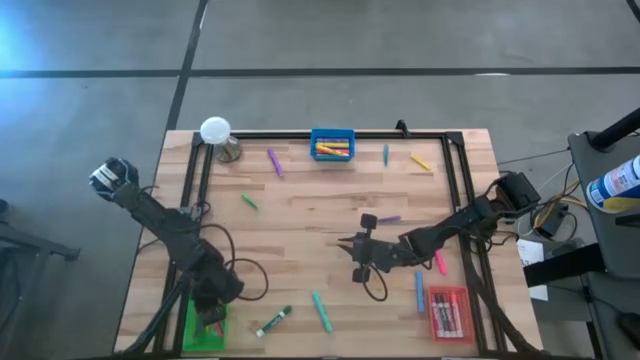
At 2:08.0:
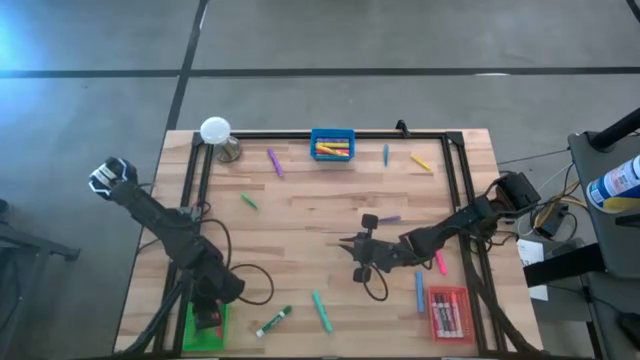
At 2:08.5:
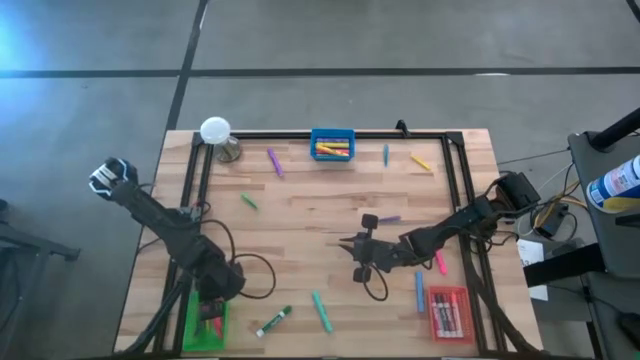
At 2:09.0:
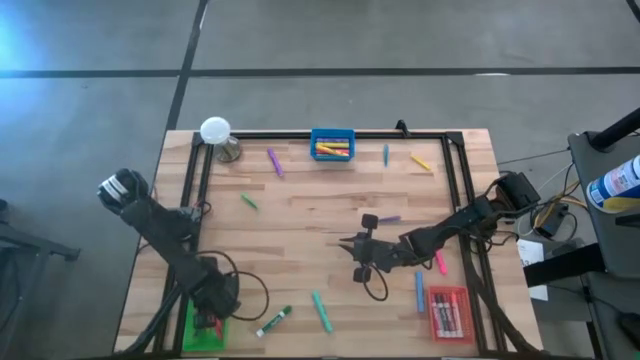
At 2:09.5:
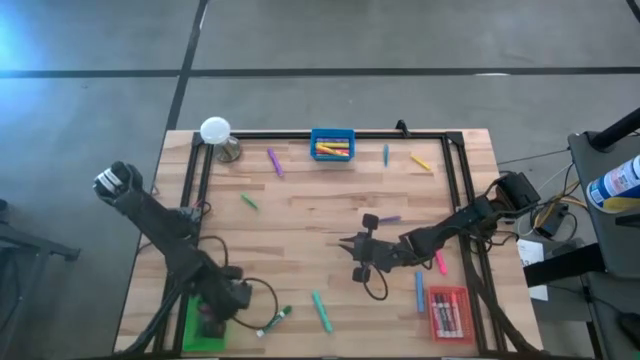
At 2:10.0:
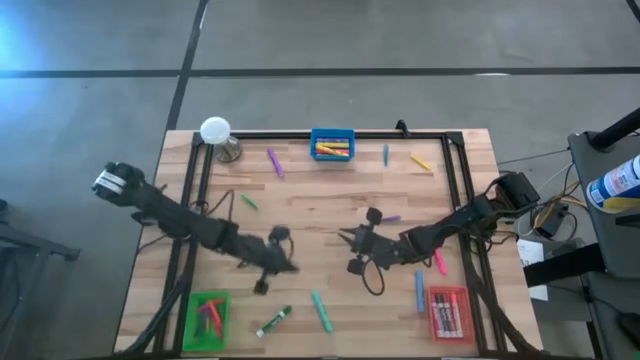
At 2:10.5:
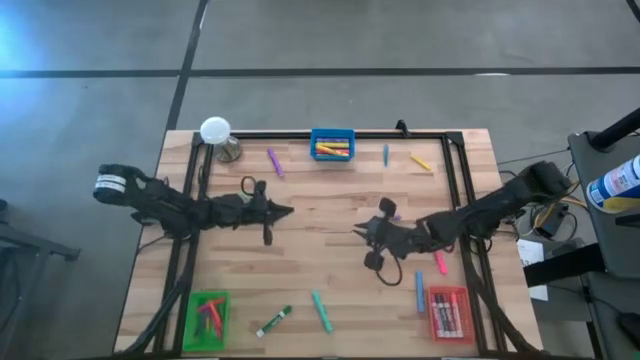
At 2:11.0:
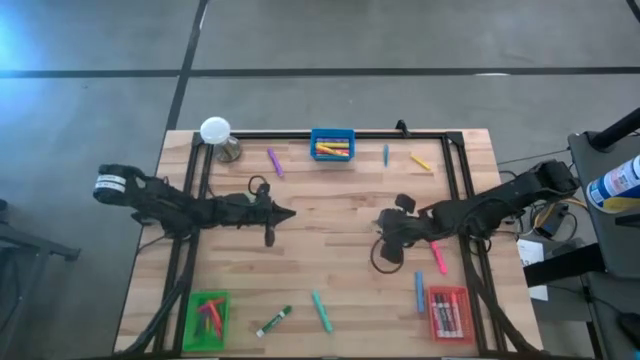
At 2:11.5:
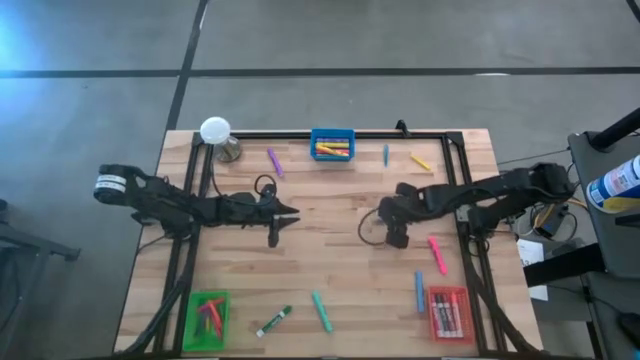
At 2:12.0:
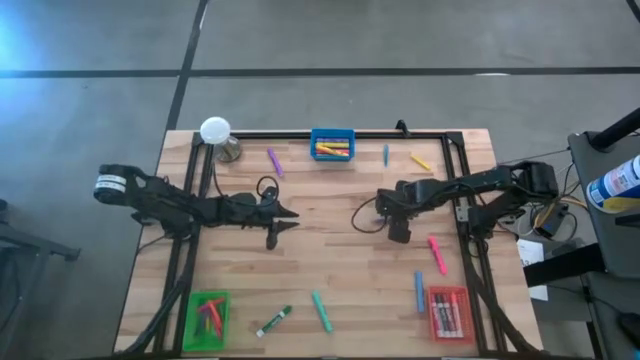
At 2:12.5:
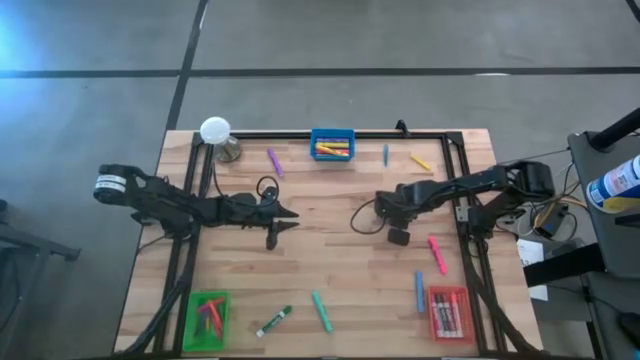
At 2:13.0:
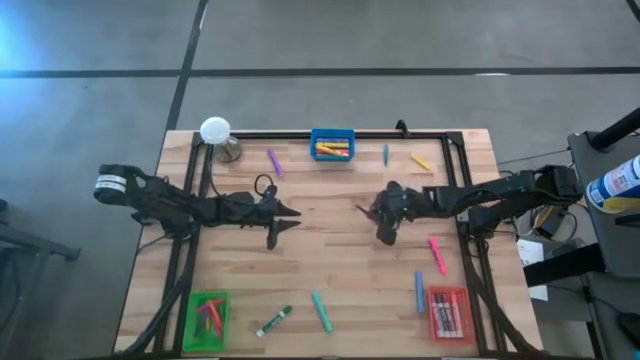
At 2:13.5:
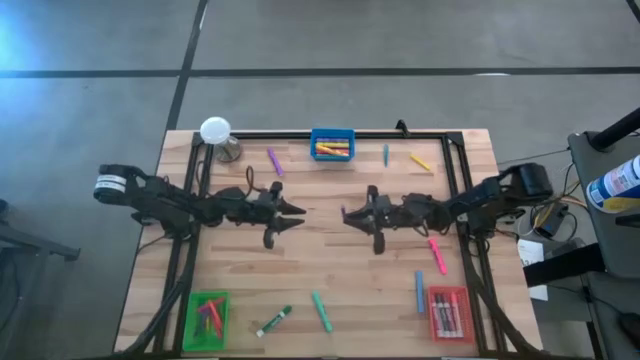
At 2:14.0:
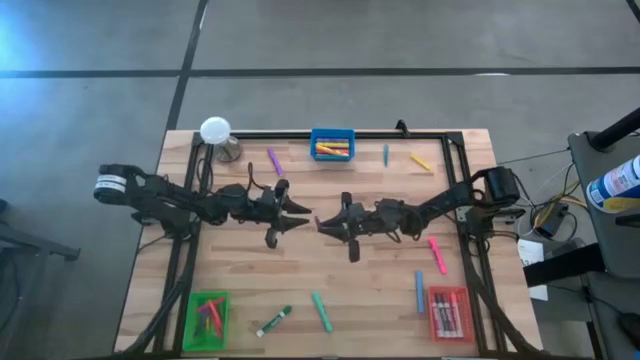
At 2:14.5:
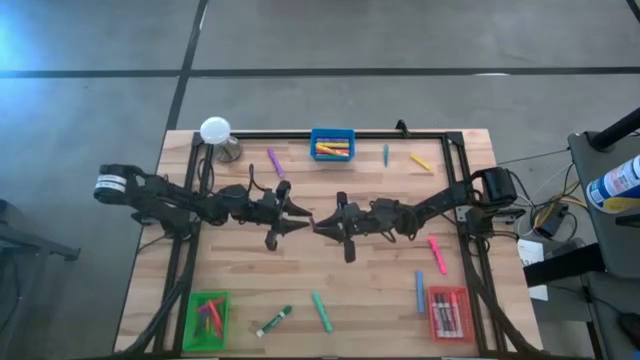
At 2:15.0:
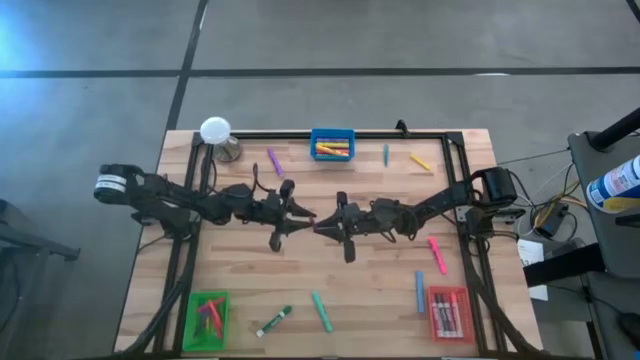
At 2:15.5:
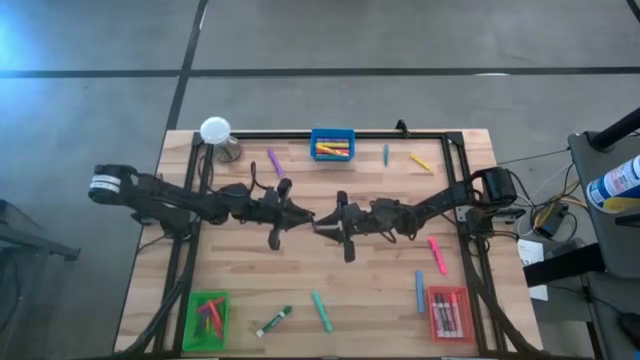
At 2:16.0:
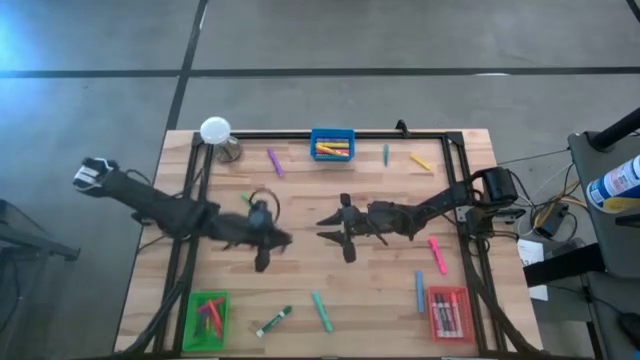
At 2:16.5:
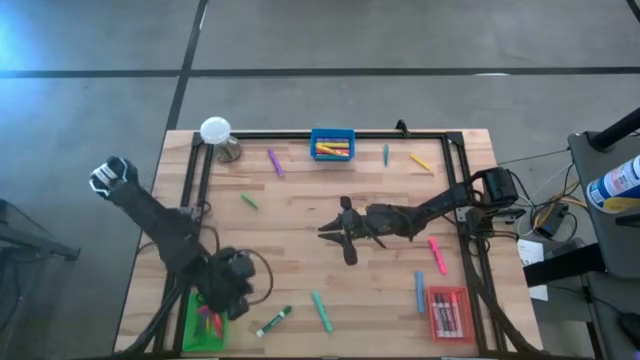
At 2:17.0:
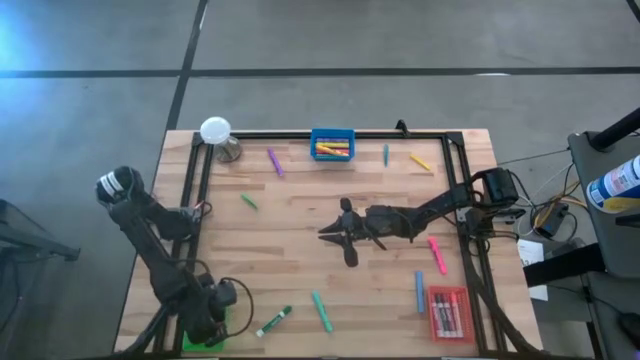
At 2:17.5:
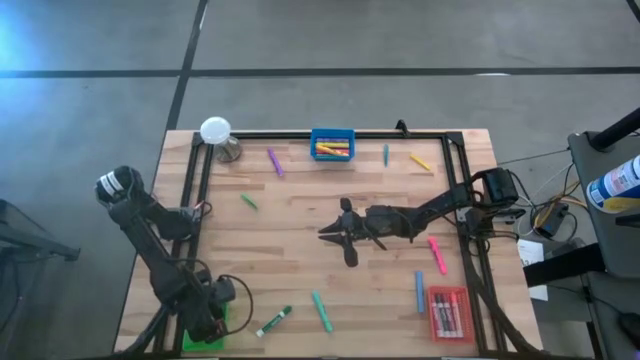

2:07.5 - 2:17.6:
Task: Pick & Place Markers
Put the violet pen into the green bin

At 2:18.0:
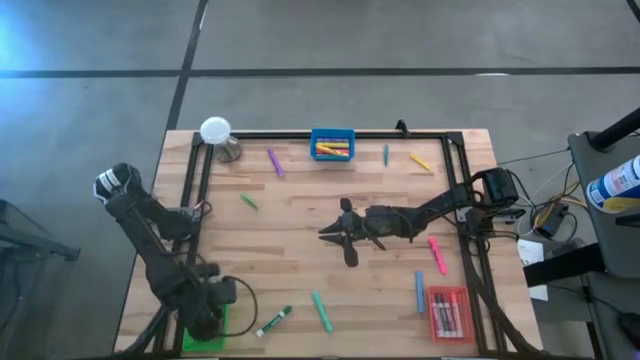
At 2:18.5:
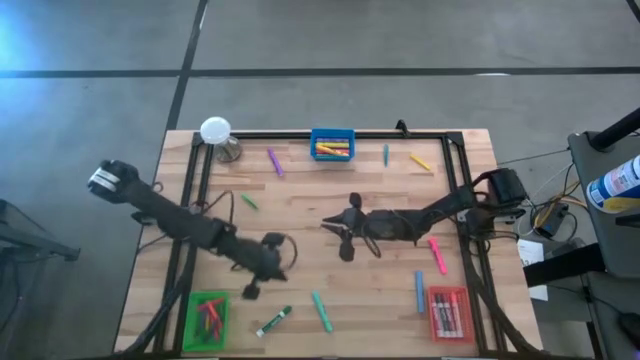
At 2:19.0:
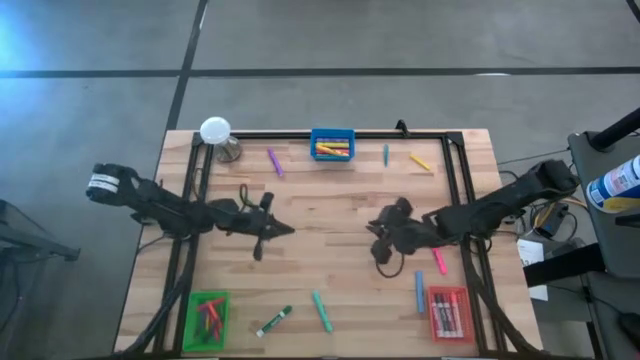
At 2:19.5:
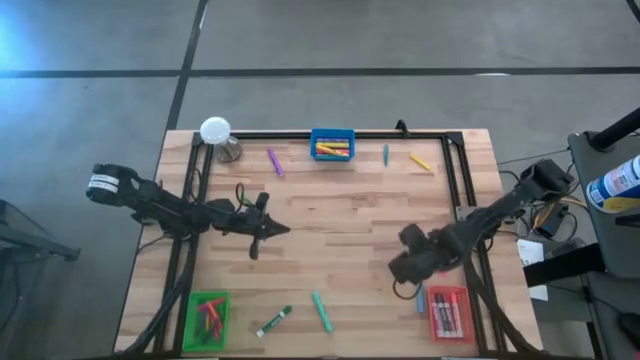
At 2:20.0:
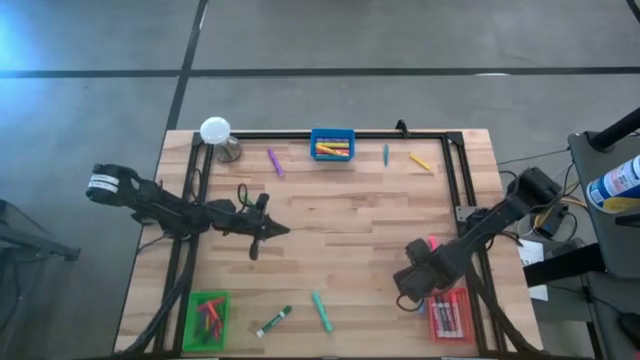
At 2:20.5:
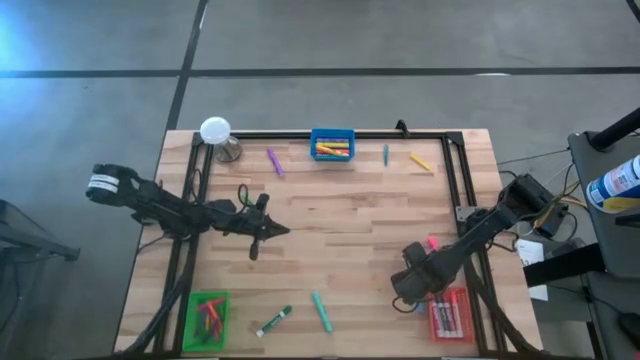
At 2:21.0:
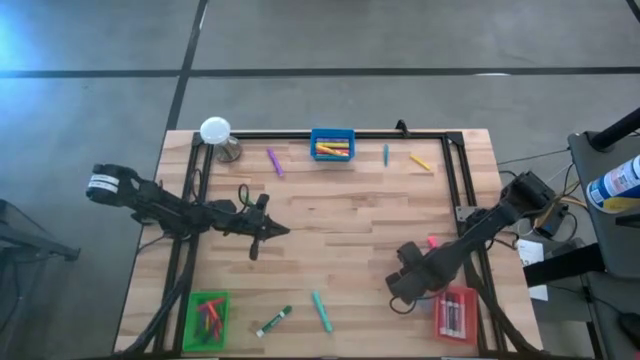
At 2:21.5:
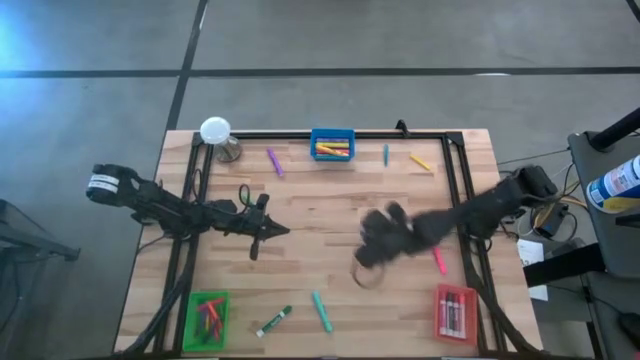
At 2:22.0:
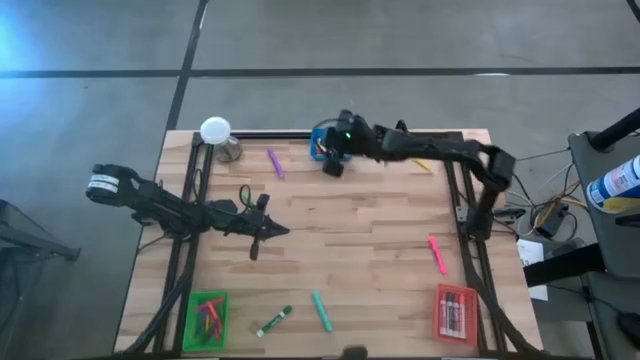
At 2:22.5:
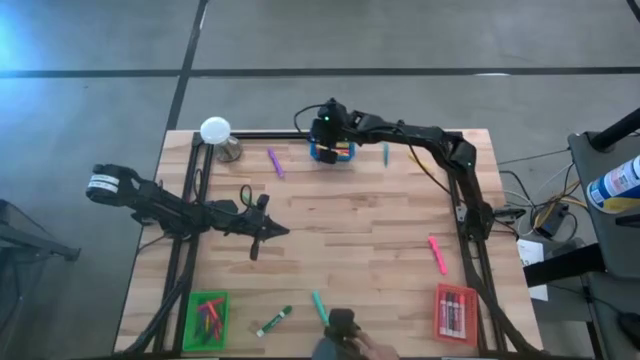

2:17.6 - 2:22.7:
Put the blue highlighter into the blue bin

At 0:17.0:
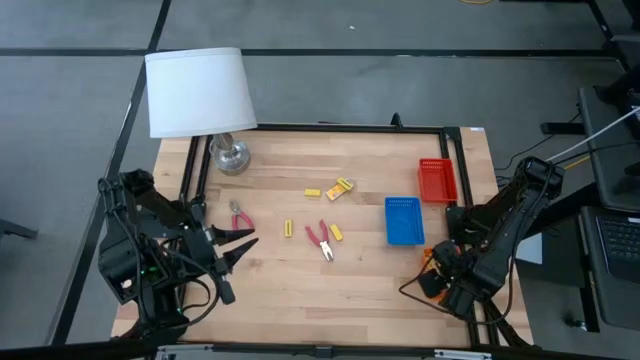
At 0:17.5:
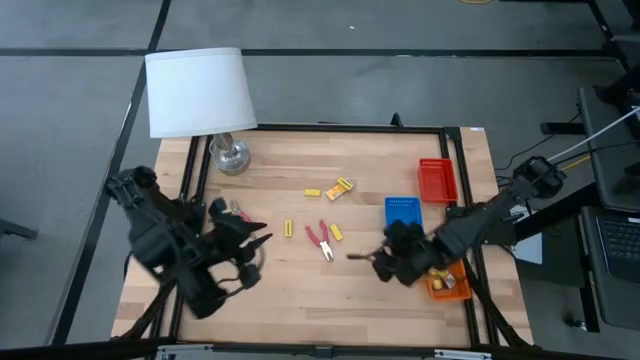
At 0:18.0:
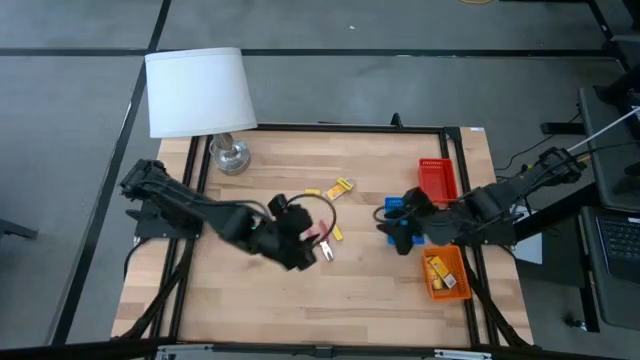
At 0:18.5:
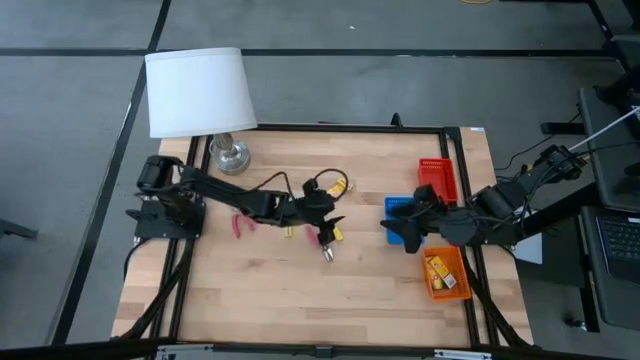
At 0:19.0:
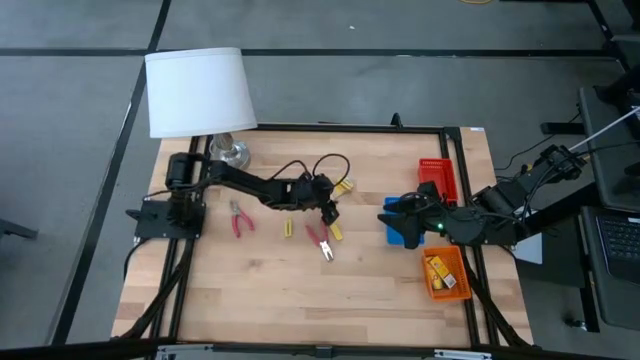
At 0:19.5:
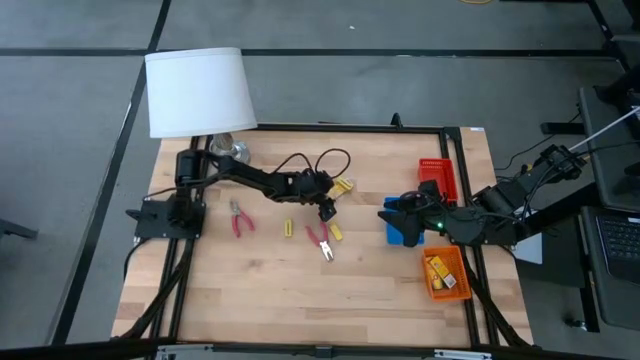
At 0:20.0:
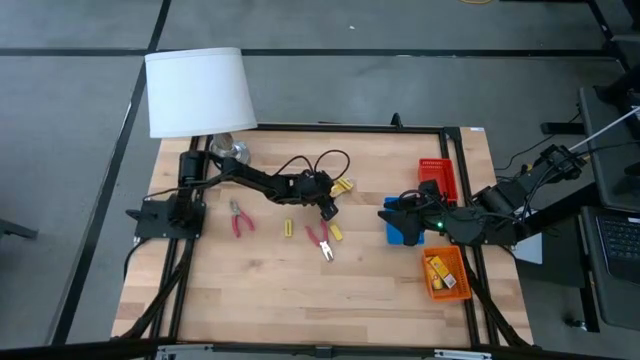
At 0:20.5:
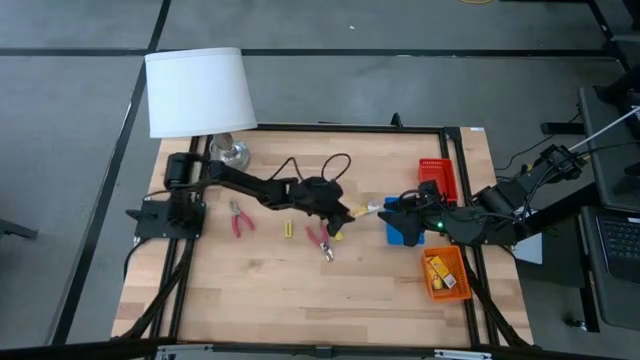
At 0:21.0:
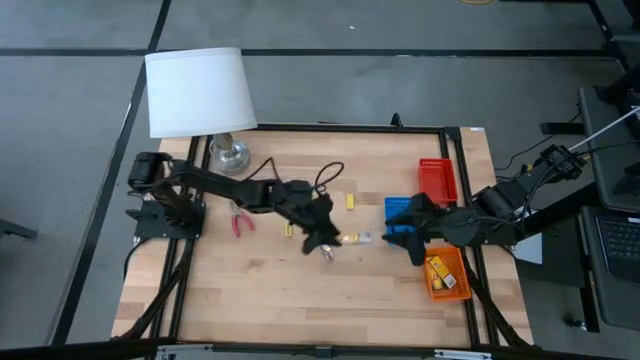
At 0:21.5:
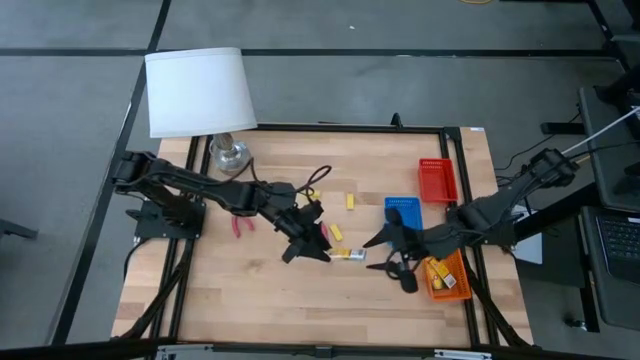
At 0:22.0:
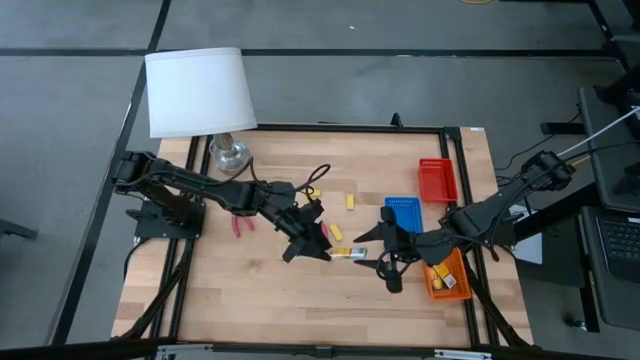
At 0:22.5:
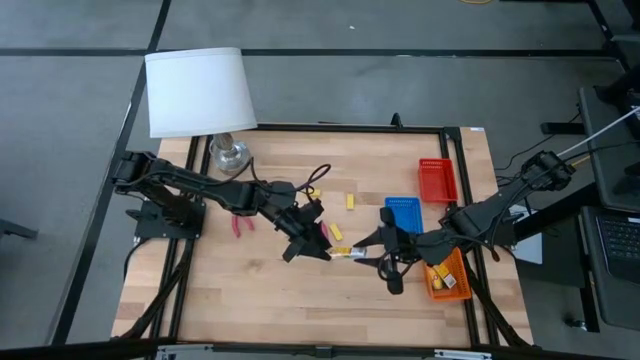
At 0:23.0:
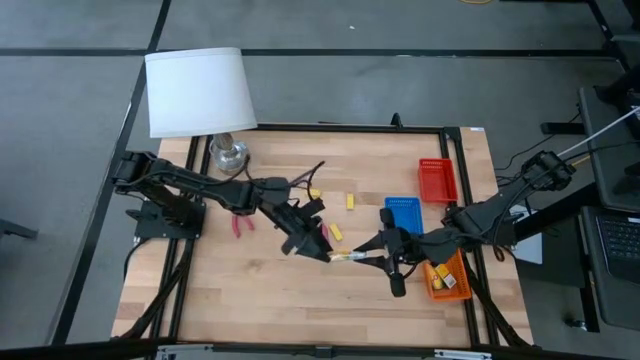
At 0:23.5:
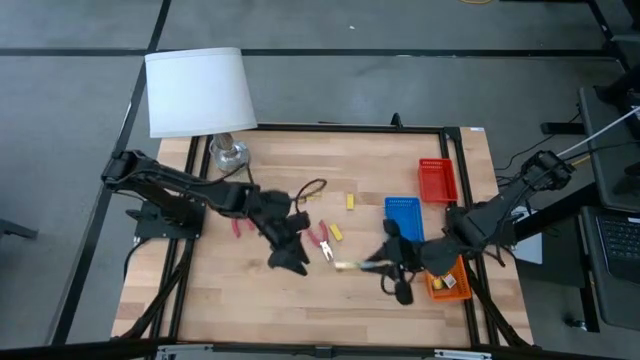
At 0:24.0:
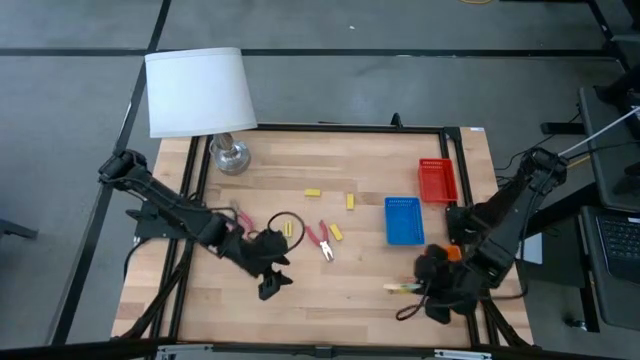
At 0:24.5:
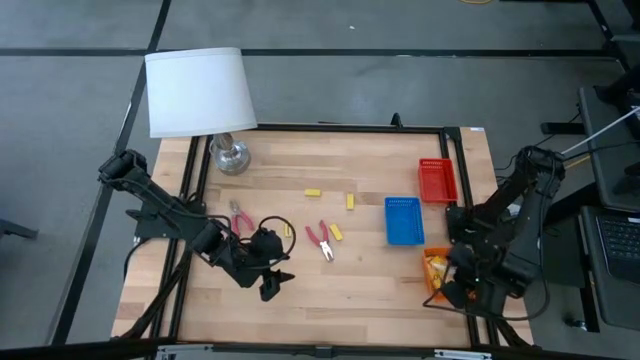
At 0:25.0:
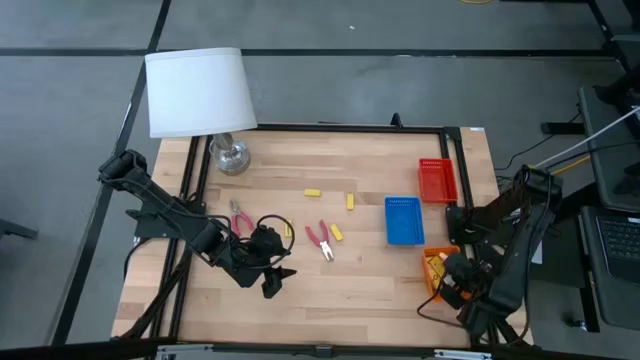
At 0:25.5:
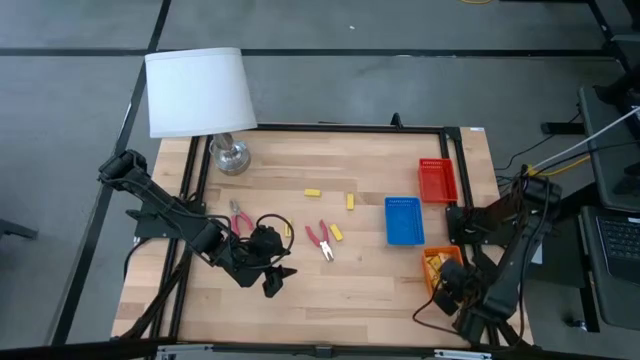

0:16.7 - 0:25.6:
Task: Pick & Place School Supplies
Put the box of crayons into the orange bin
